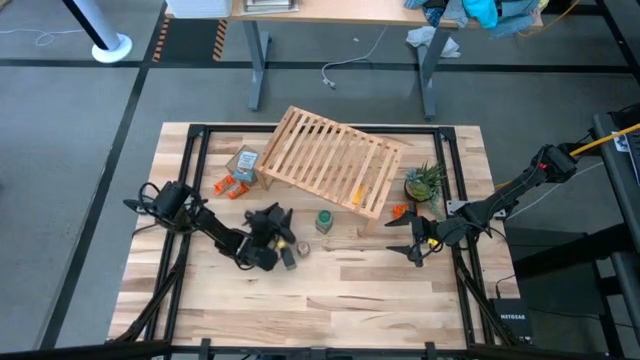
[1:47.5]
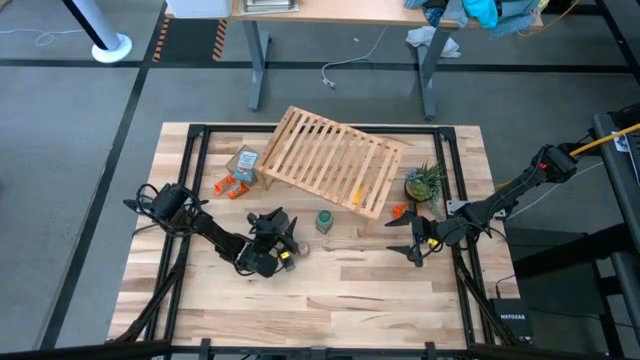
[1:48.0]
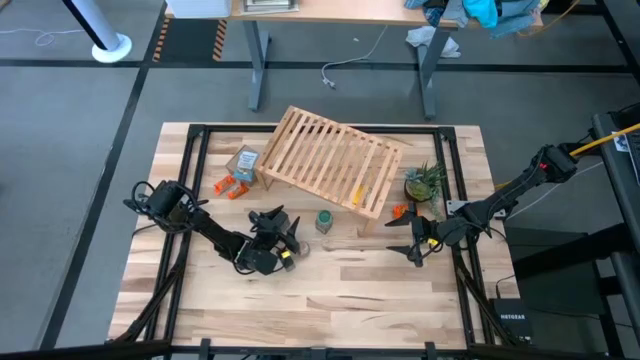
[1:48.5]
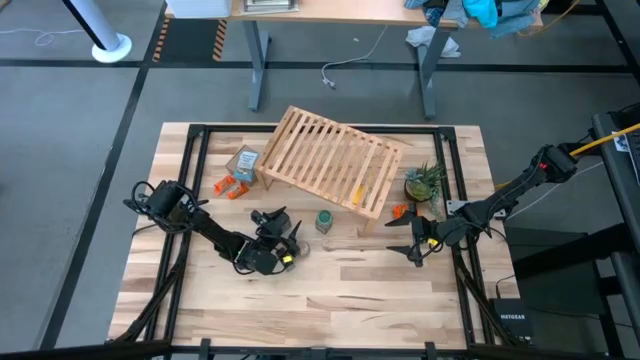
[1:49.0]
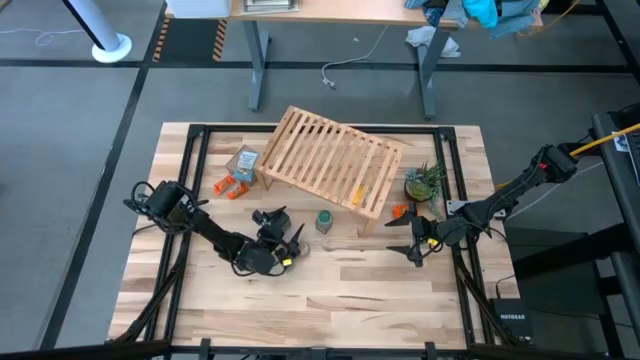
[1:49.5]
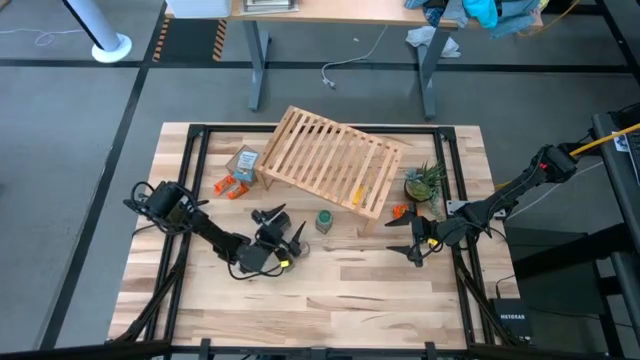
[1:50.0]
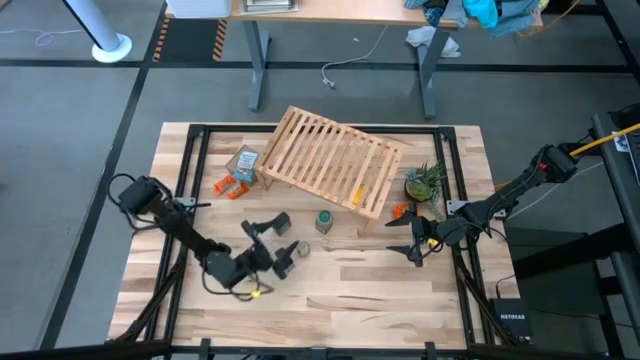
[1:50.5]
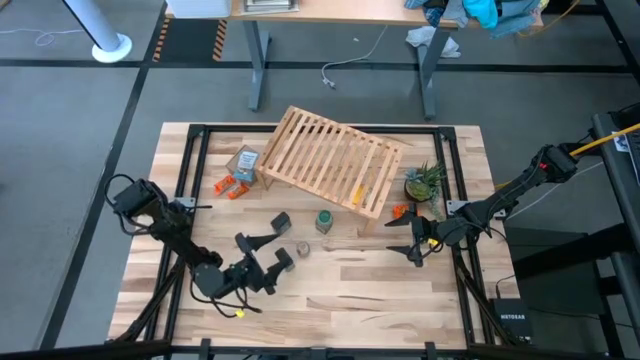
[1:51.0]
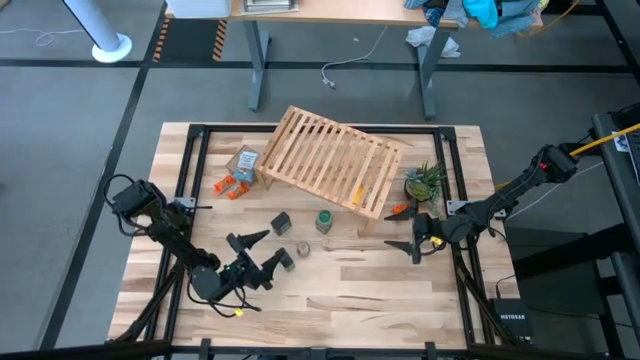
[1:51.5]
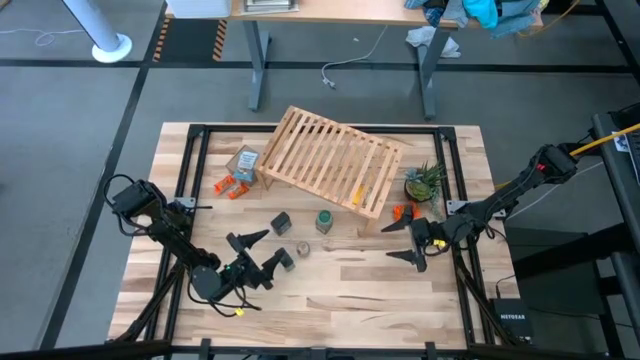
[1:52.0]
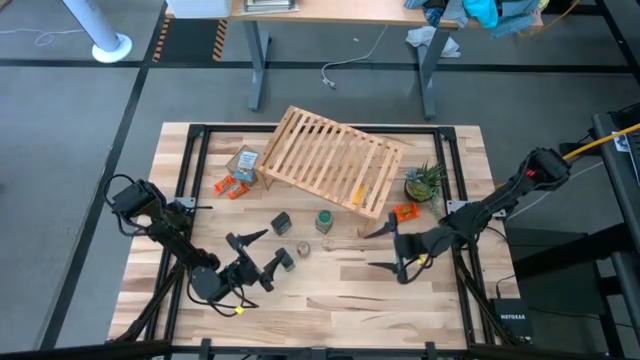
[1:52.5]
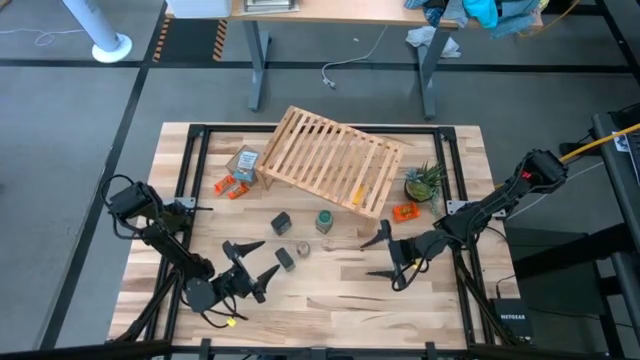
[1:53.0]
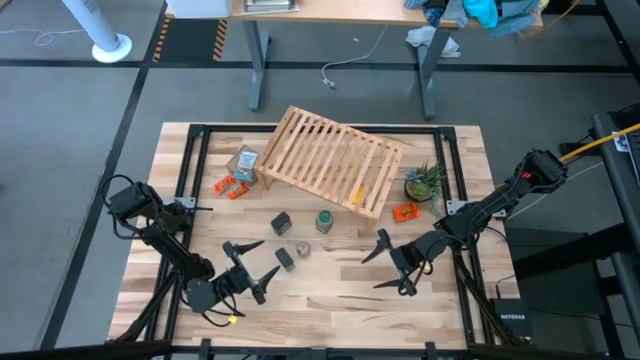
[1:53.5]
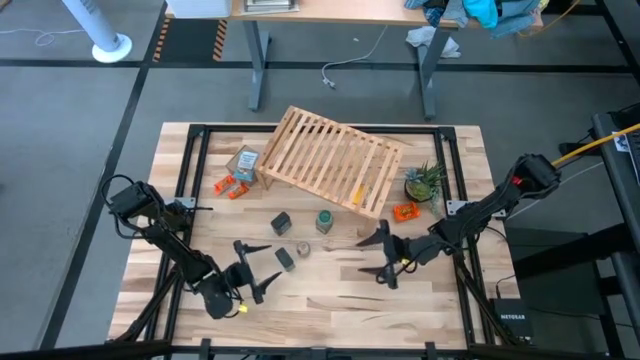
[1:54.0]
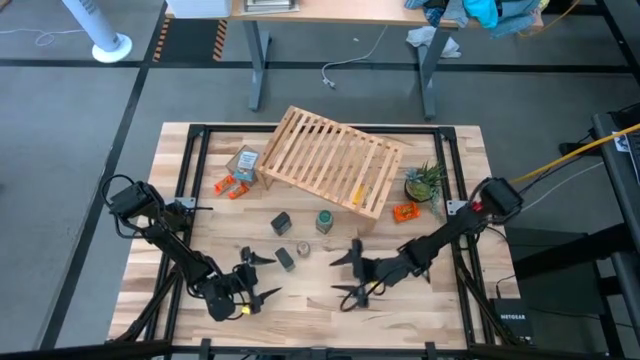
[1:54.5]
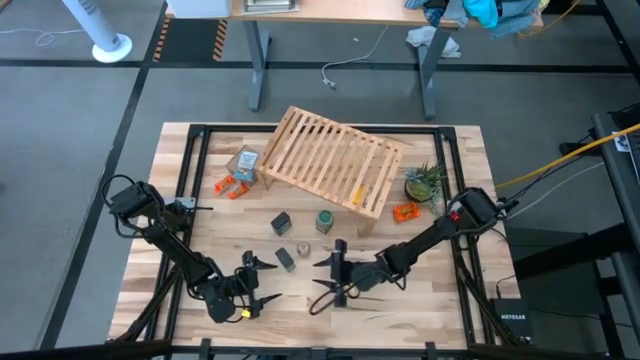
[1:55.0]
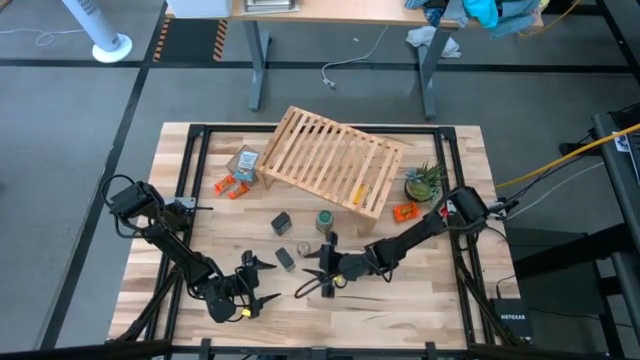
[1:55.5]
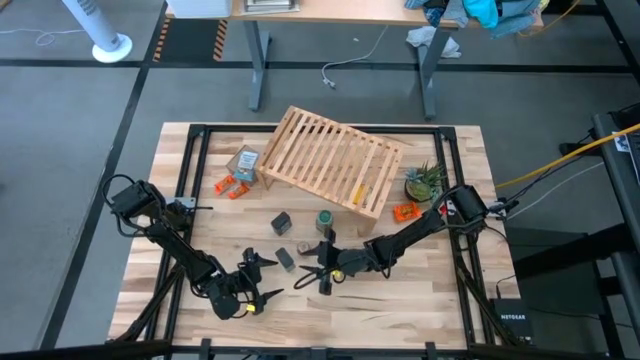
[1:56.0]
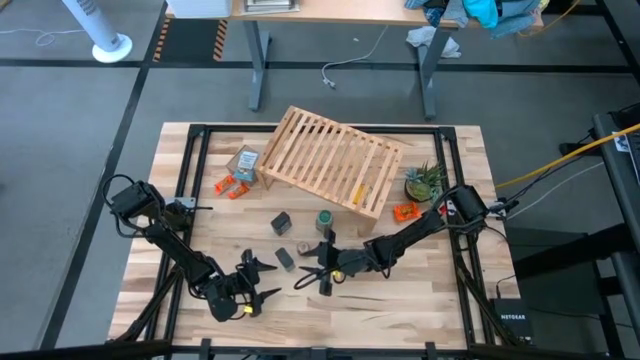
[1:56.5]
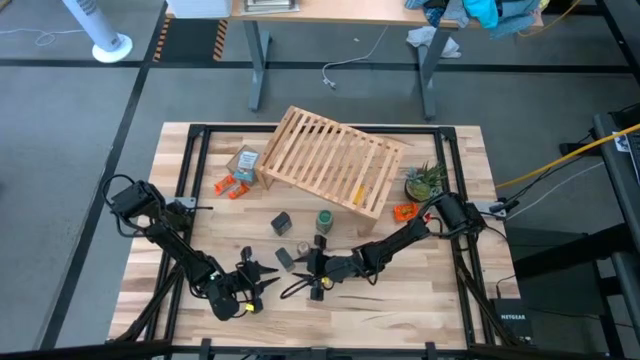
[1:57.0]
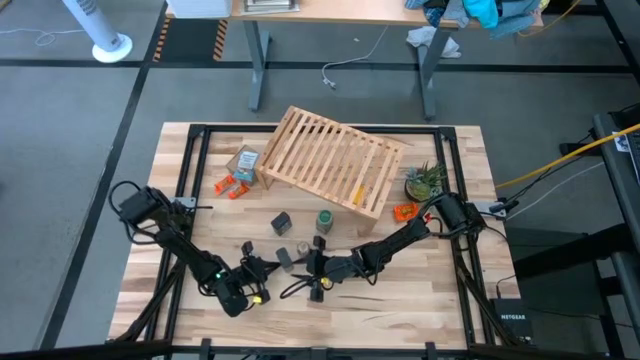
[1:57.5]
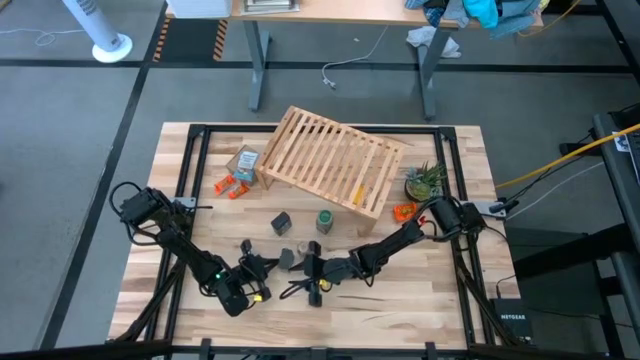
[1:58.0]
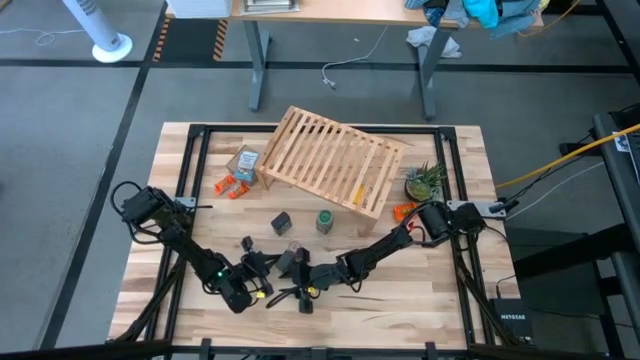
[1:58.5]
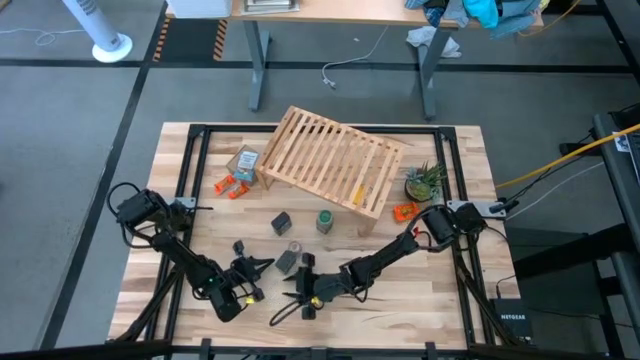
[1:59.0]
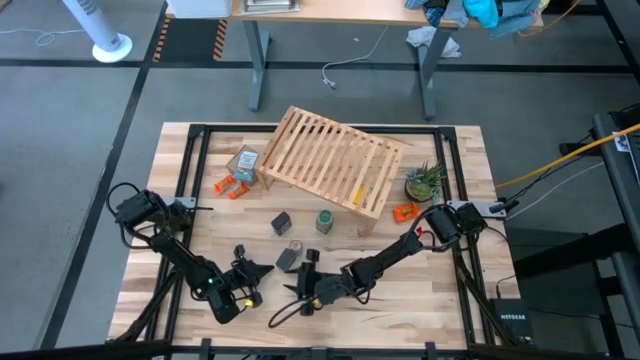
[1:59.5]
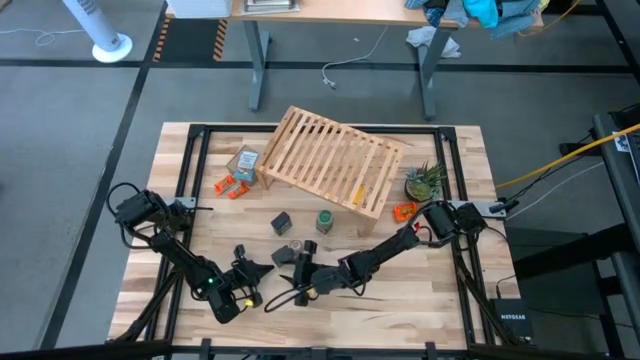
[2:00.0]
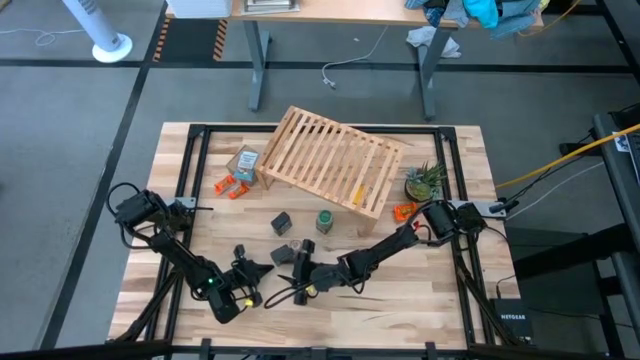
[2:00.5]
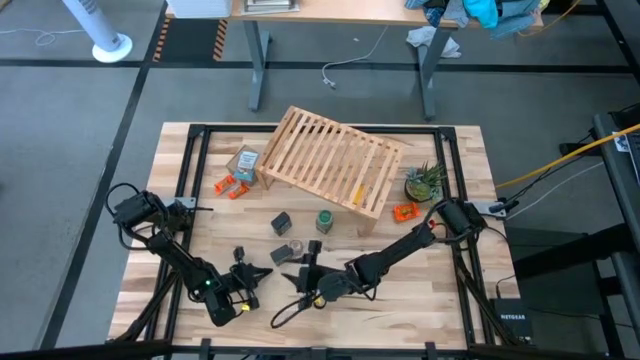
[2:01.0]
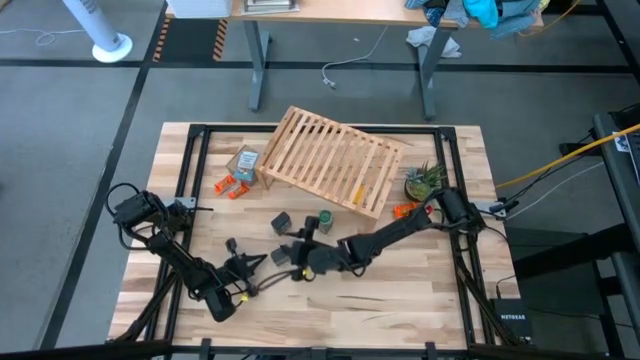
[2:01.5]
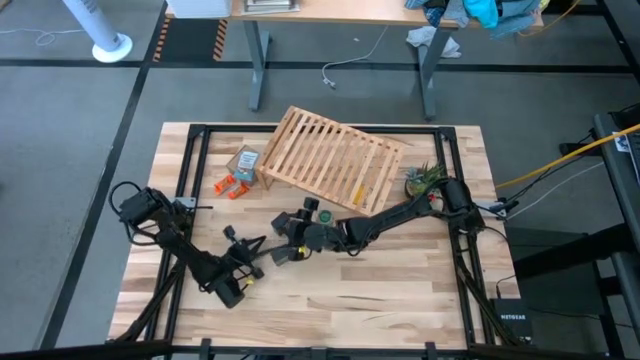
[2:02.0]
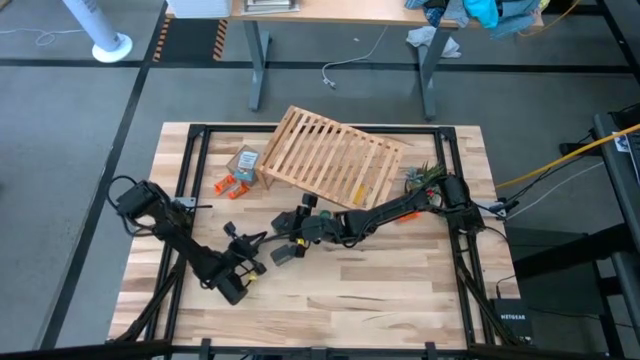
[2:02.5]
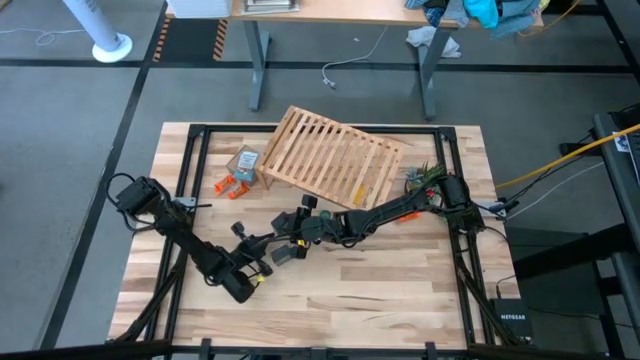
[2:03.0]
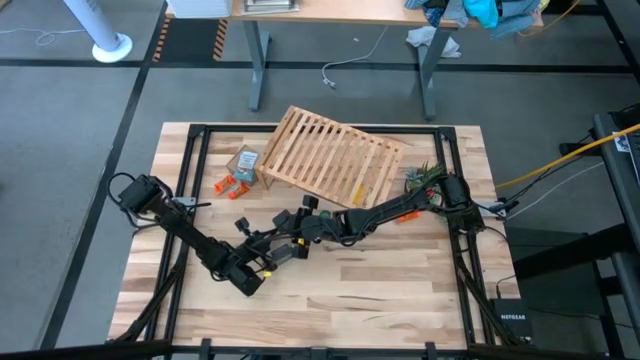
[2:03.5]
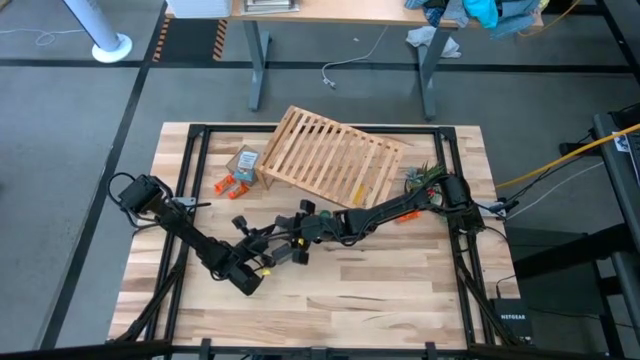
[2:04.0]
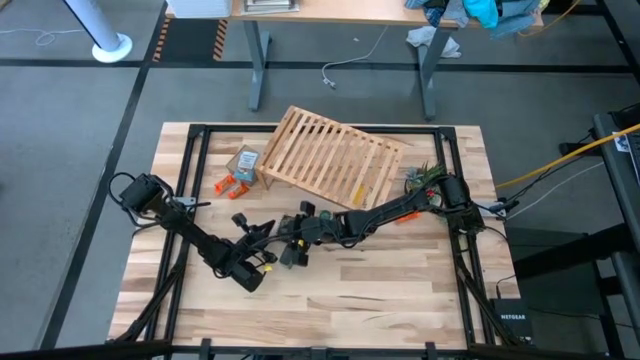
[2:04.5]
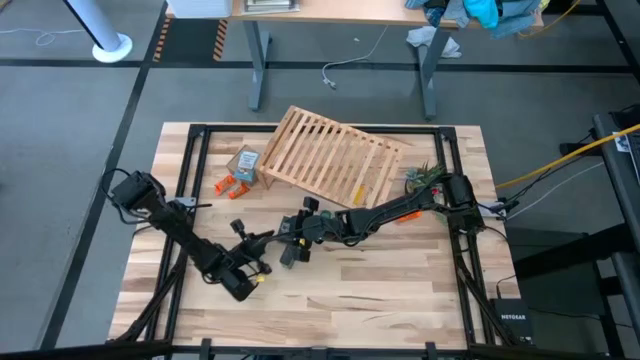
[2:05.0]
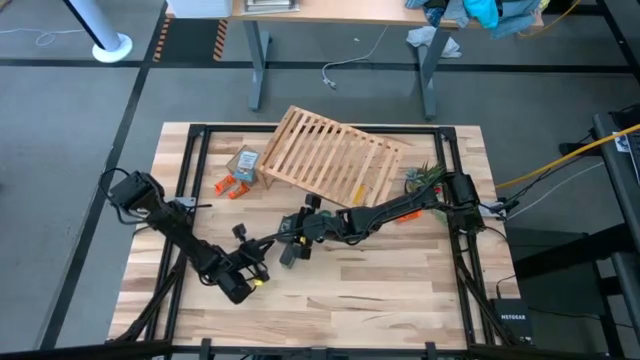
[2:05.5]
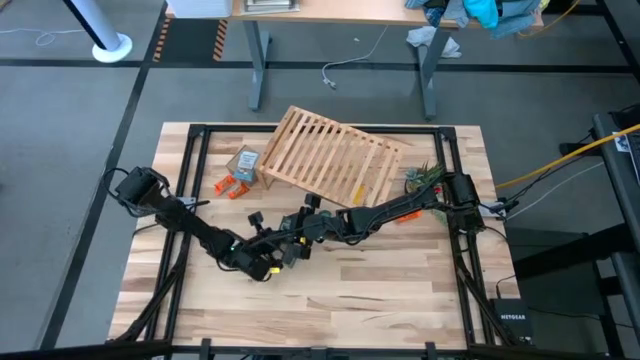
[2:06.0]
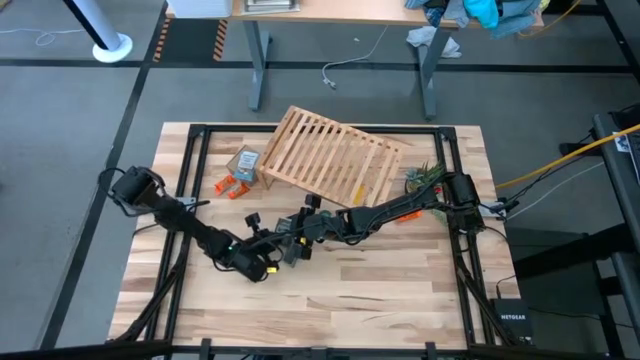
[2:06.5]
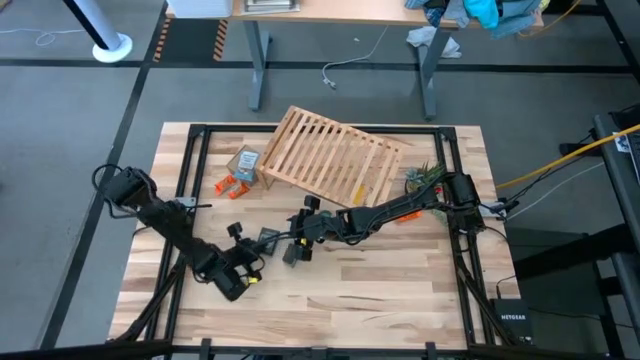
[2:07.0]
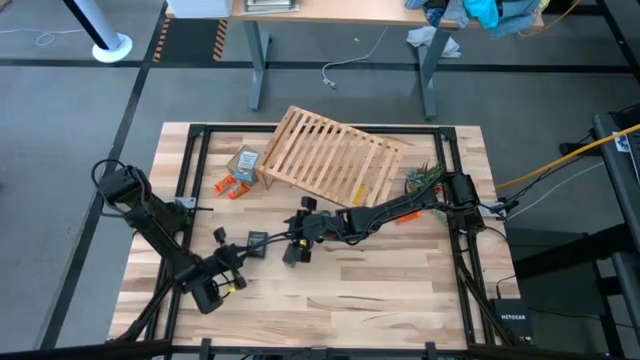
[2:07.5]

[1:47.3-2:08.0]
Task: Shelf spices
Remove the green seasoning can from the shelf

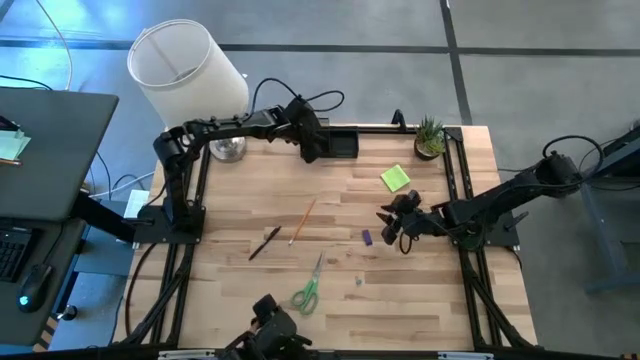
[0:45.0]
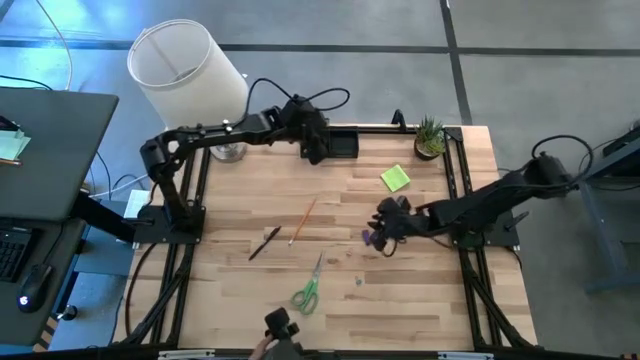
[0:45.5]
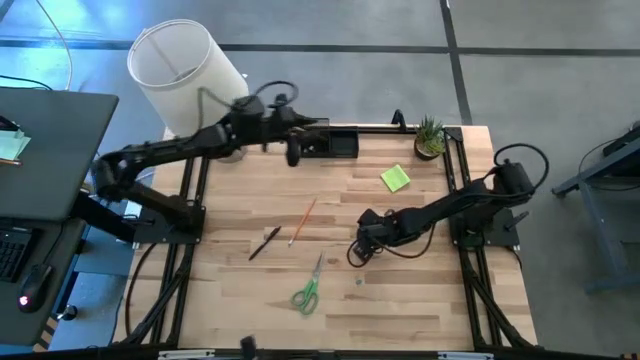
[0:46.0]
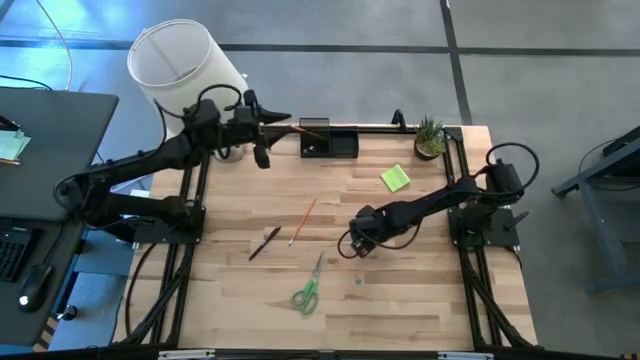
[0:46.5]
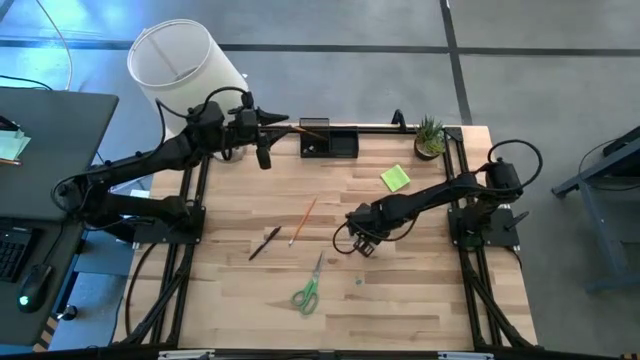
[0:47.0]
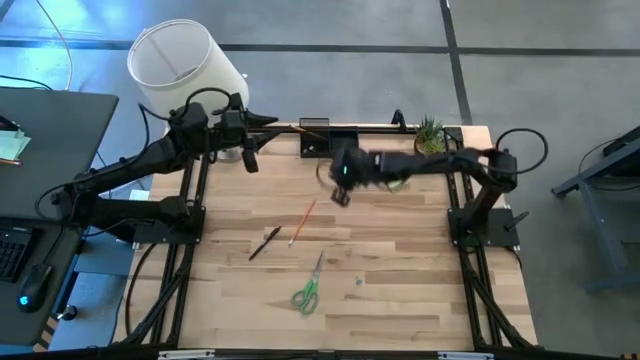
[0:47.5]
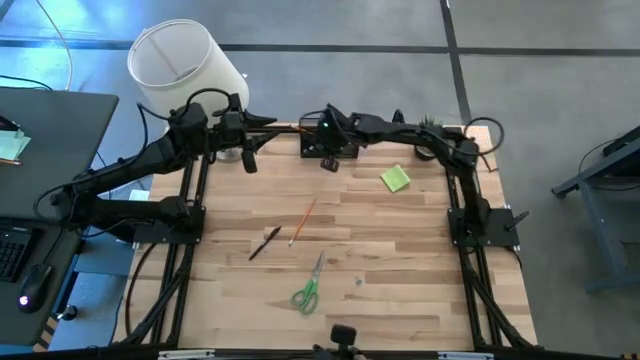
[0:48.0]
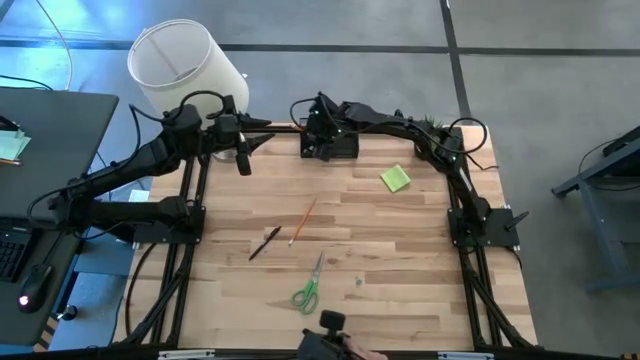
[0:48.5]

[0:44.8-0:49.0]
Task: Pick and place office supplies into organizer
Put the blue eraser into the black desk organizer
